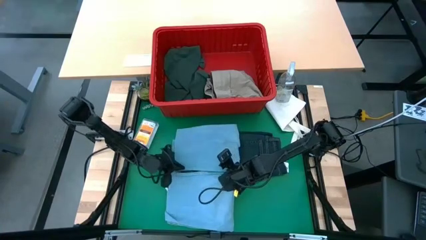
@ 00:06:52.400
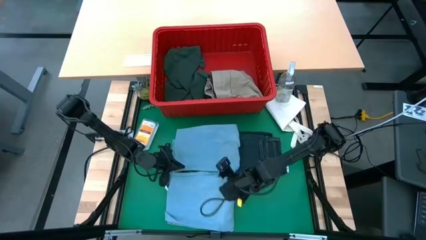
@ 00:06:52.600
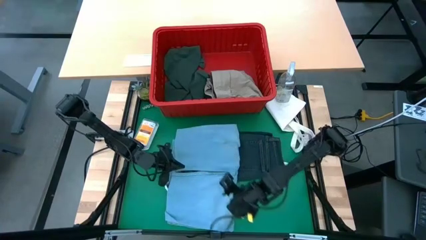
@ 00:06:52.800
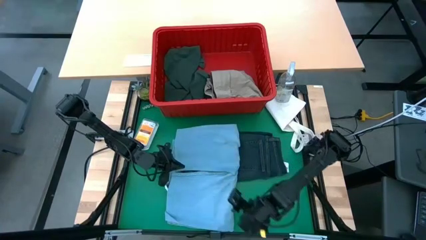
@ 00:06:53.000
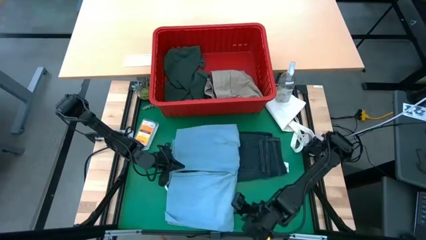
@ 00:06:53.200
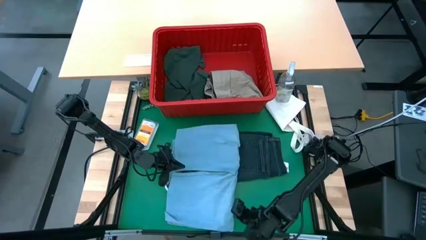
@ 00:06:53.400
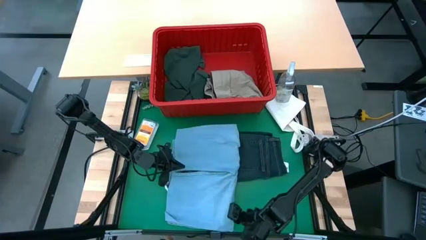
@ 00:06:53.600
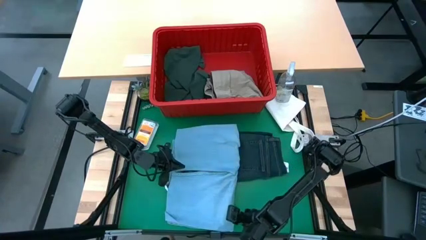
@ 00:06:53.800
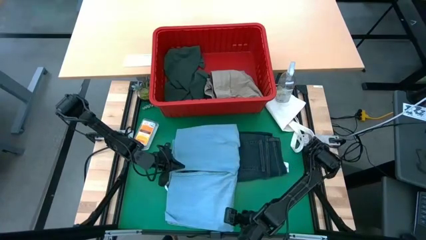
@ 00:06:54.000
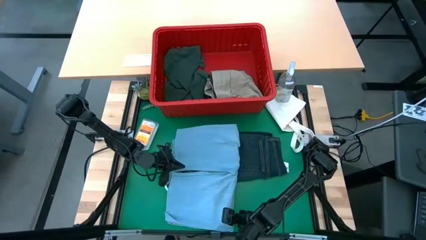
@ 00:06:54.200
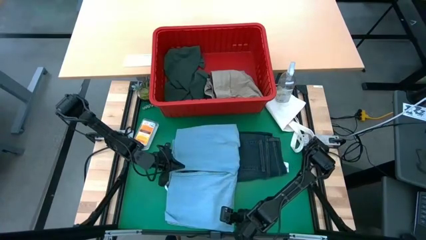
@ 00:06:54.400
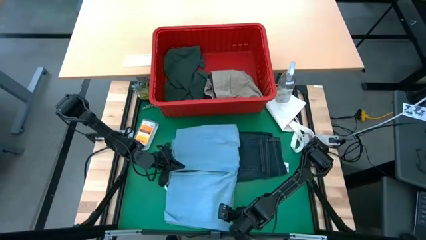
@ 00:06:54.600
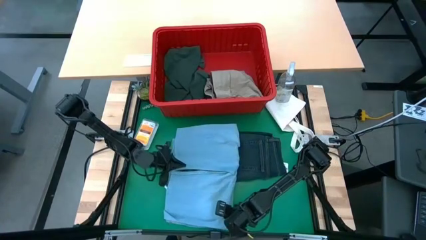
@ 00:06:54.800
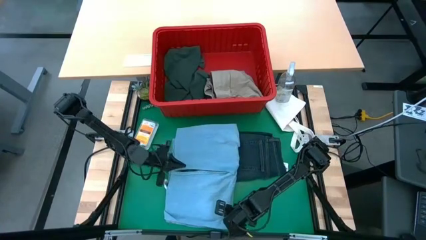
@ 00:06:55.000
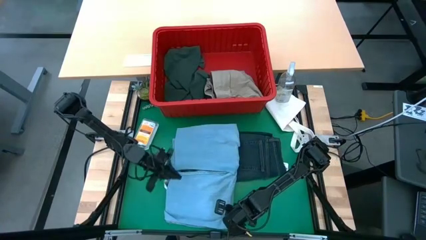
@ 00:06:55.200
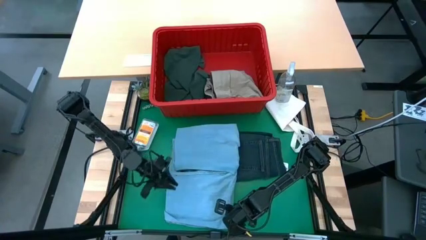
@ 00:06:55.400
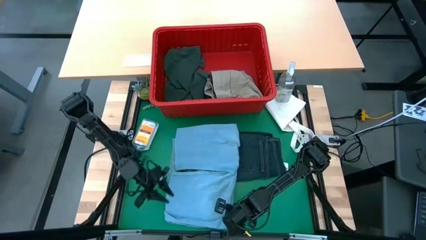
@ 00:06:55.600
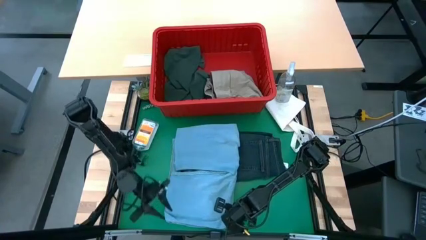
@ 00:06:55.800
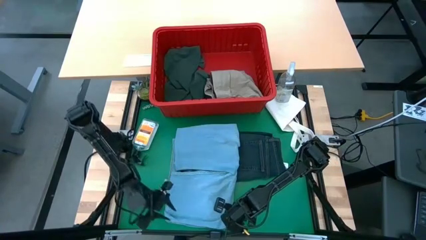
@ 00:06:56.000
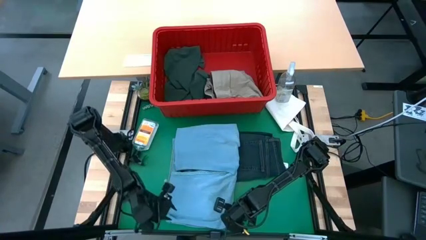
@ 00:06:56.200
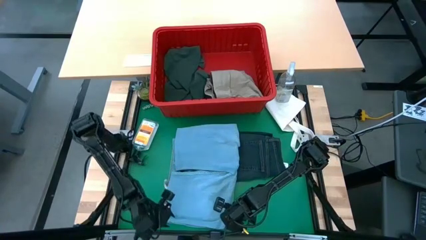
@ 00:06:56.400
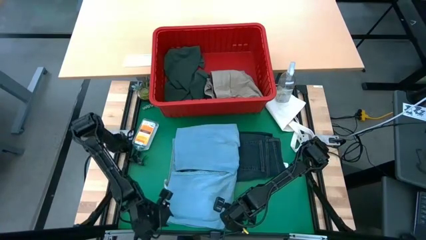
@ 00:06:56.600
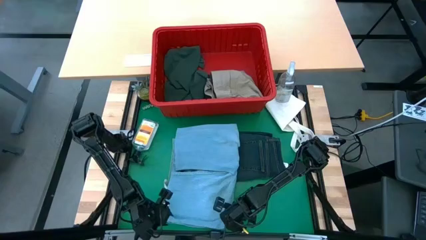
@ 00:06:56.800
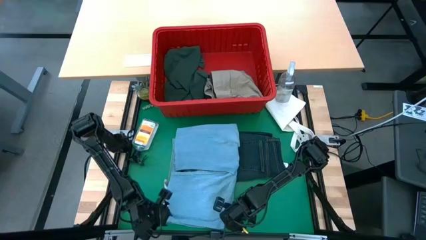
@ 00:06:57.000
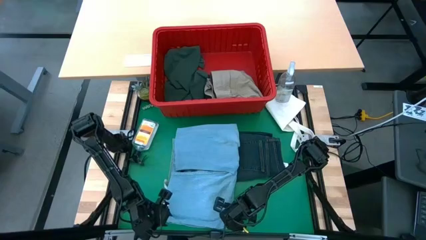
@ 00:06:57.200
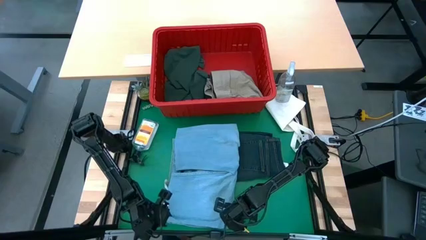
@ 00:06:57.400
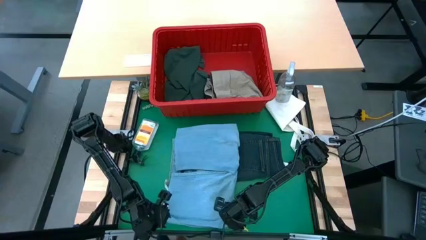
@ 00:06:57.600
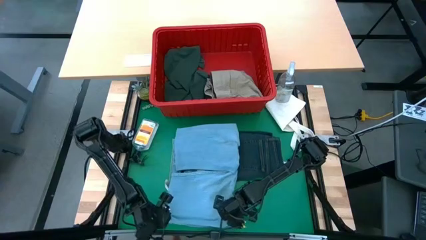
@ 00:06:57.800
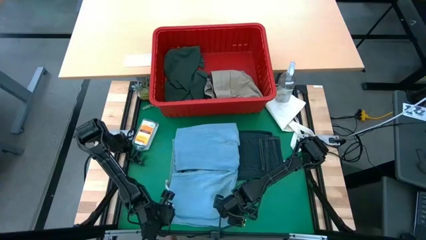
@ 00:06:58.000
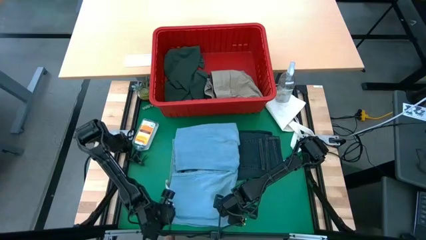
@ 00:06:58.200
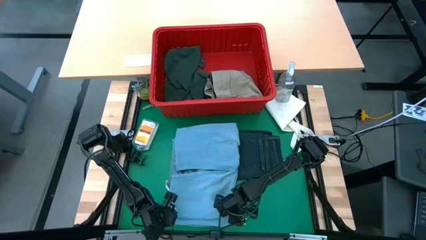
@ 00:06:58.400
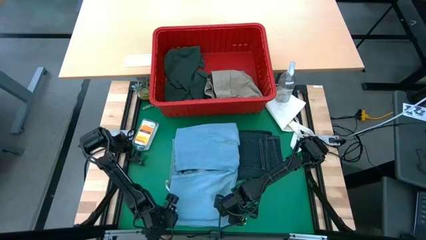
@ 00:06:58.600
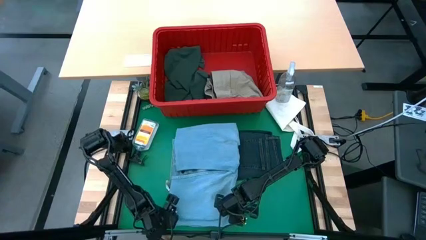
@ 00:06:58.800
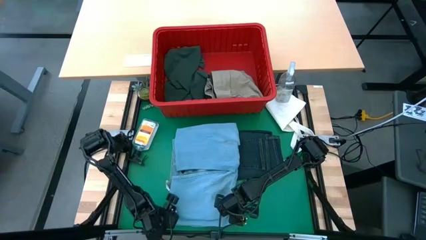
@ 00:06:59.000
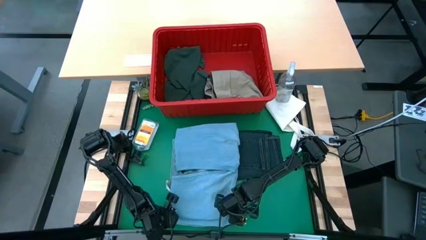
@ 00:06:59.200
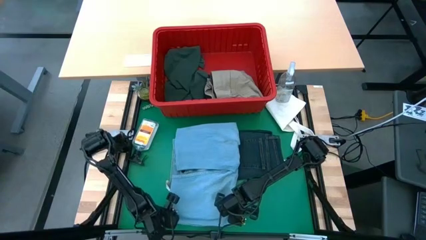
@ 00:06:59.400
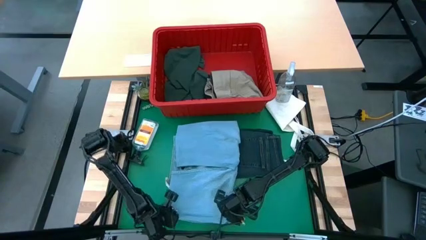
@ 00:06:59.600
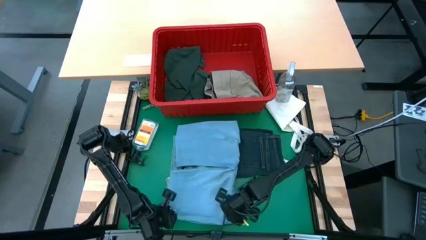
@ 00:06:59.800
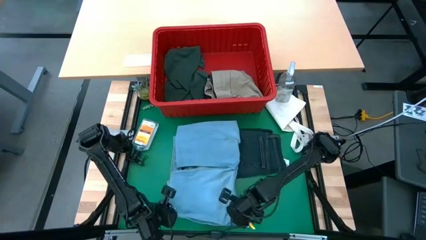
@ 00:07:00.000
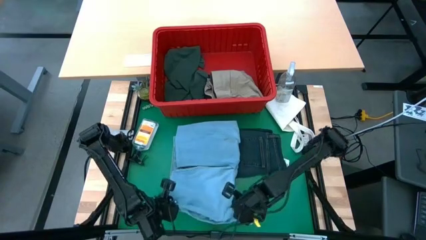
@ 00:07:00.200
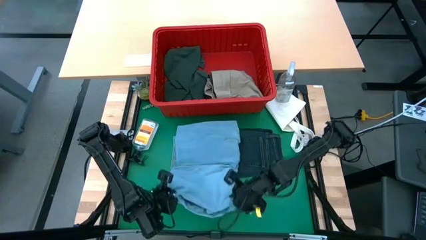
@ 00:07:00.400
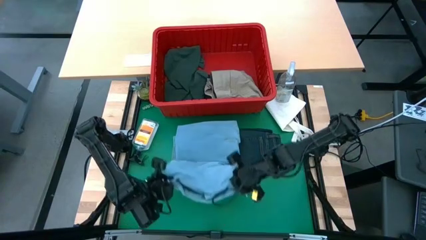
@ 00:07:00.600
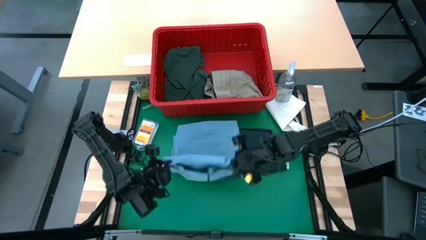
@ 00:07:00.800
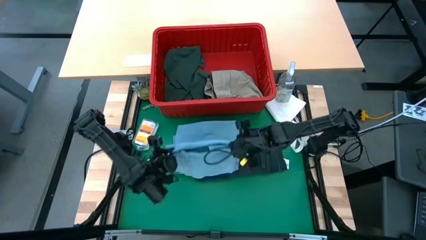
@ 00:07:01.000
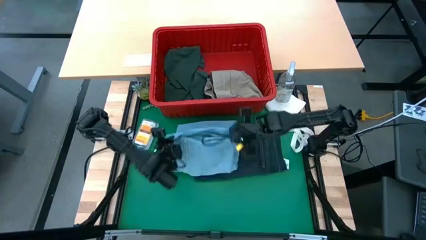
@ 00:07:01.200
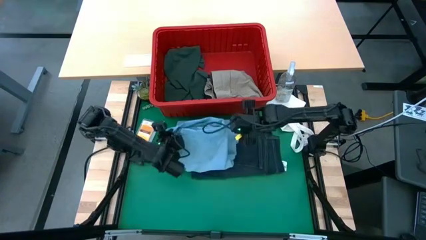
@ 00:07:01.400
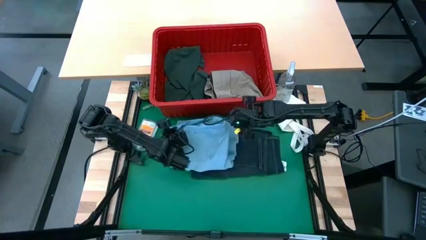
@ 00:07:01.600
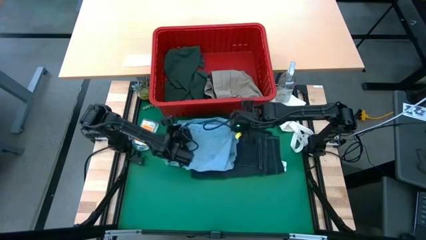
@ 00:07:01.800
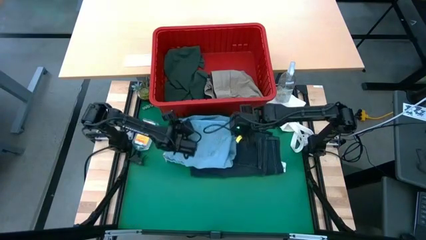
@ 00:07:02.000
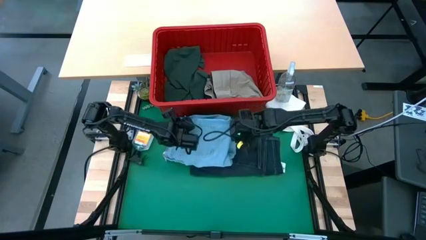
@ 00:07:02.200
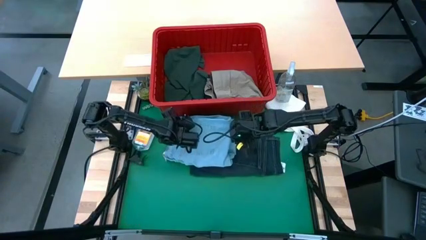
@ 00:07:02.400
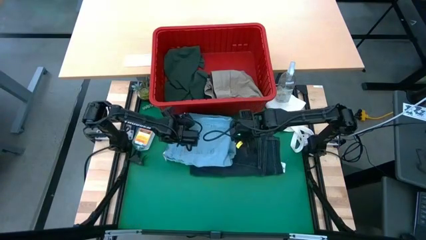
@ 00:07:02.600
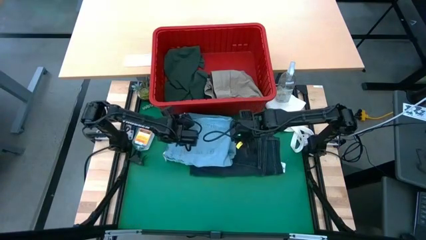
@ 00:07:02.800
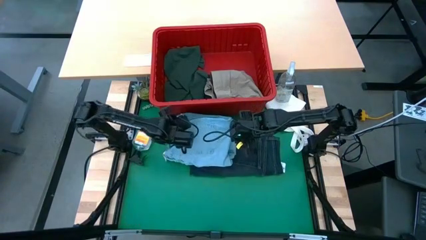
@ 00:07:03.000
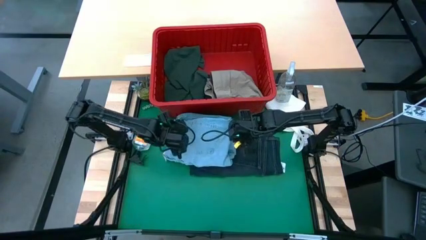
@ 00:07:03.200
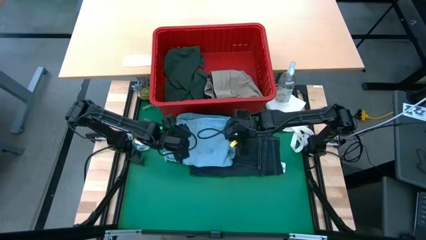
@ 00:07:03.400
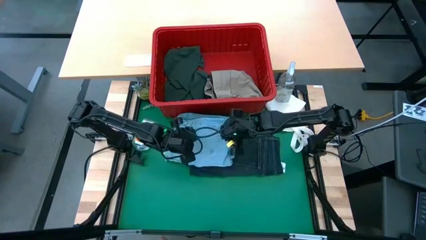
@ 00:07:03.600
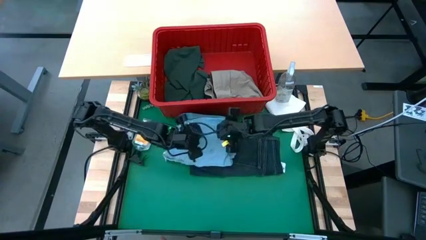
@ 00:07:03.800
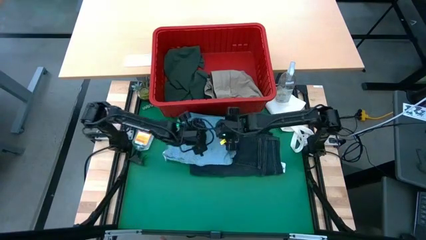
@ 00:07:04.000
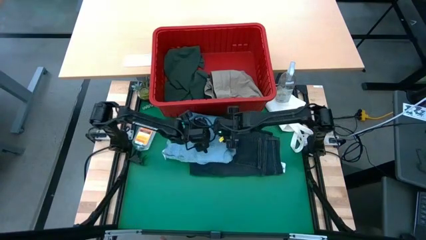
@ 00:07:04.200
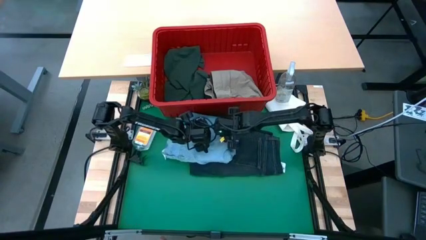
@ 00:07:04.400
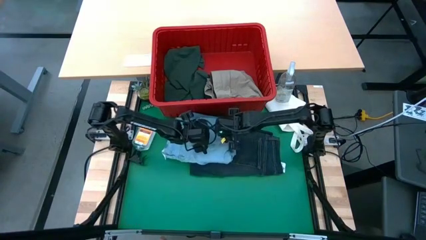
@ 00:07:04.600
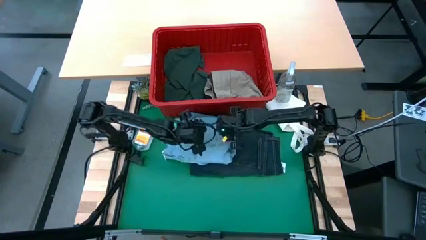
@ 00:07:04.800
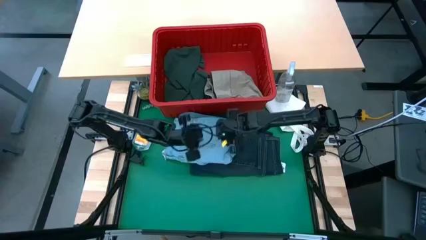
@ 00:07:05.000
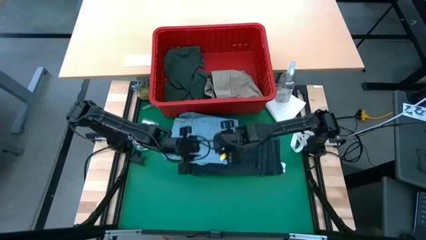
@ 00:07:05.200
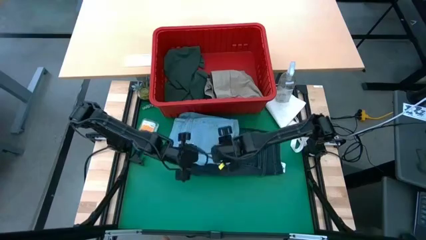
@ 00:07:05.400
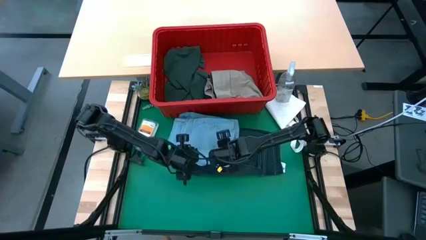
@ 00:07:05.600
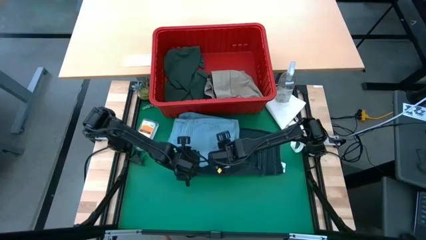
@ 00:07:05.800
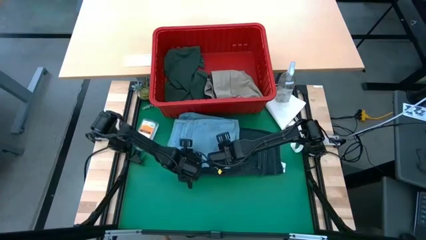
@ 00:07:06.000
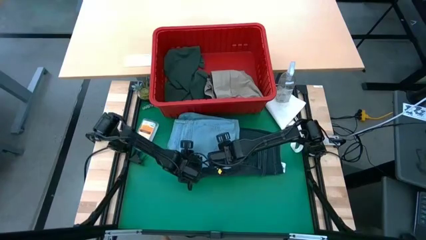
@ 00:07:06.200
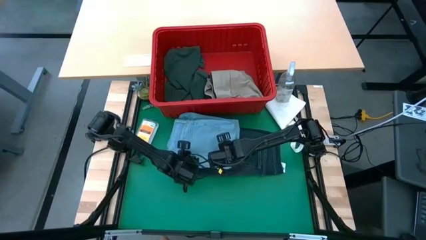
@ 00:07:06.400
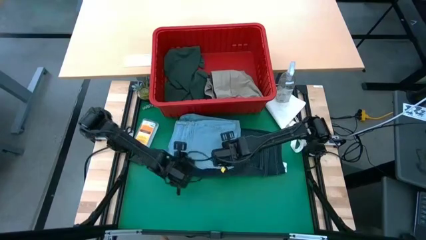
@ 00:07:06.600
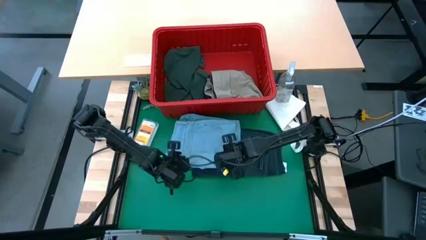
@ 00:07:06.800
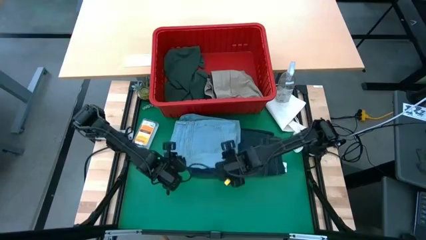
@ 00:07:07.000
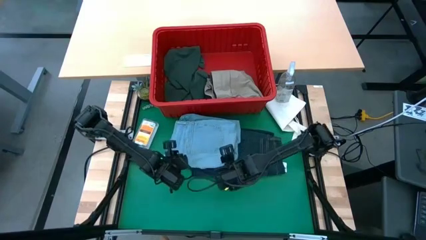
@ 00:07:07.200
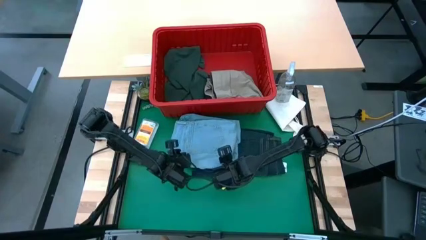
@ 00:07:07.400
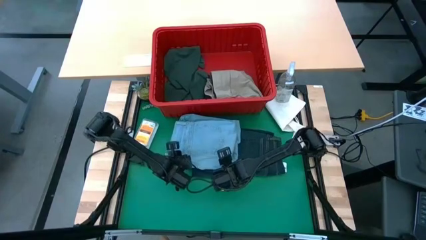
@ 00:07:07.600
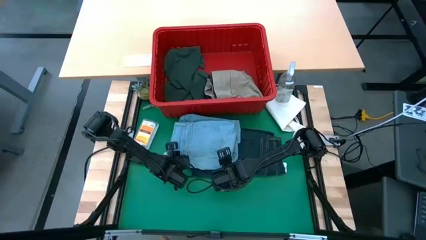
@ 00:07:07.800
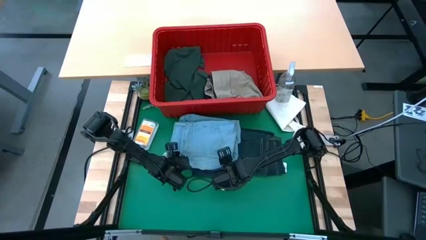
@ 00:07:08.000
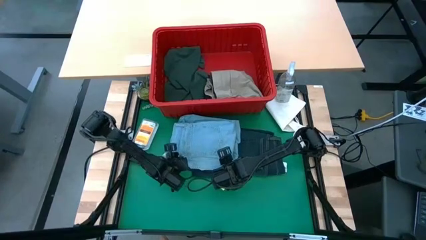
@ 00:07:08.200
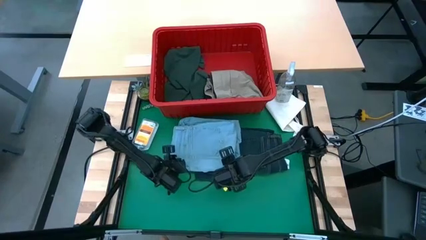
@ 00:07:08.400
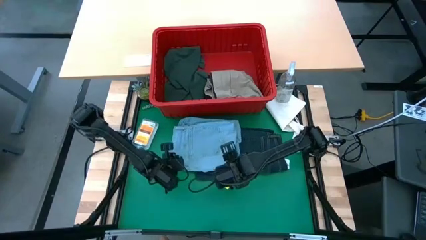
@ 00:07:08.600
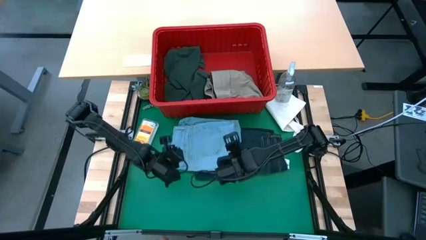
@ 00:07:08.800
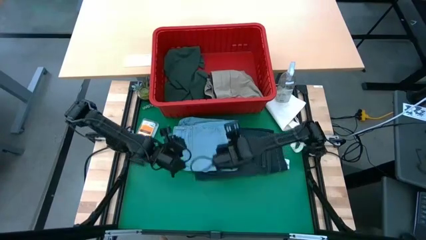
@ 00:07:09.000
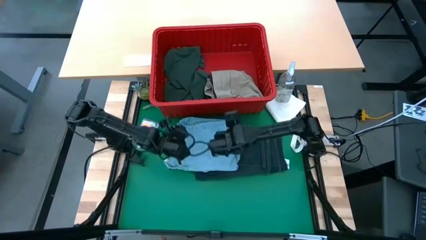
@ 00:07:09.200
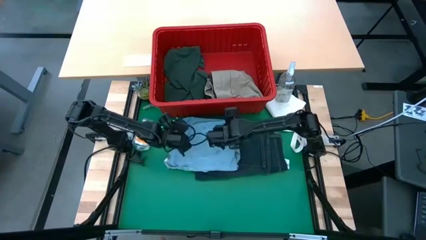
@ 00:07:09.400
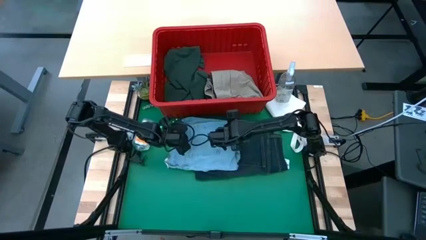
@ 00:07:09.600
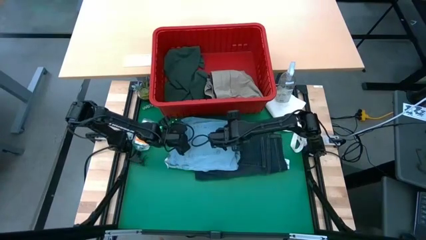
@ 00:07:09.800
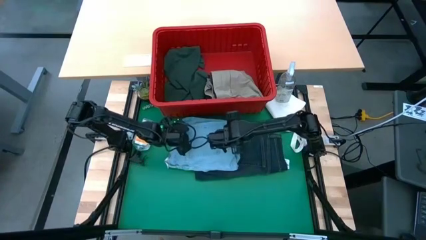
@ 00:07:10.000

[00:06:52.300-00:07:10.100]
Task: Fold laundry
Fold the light blue jeans
